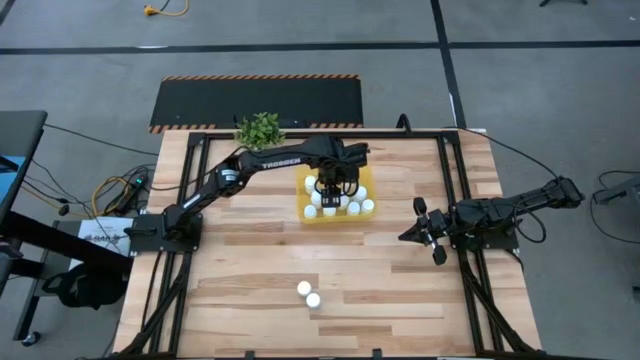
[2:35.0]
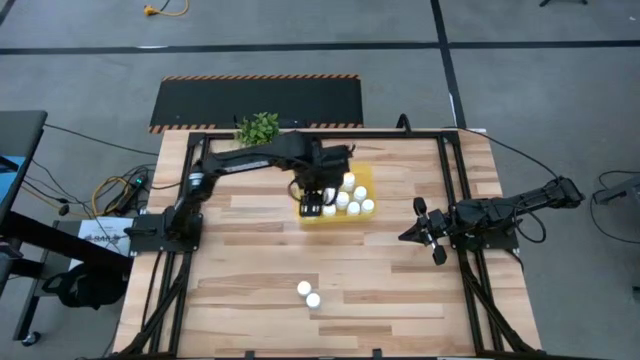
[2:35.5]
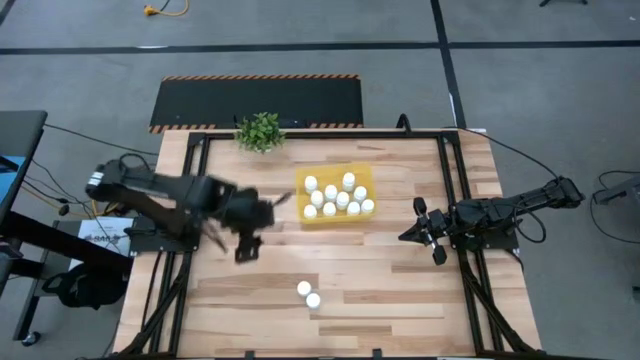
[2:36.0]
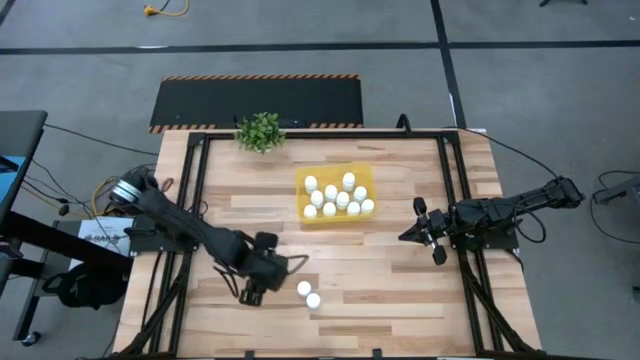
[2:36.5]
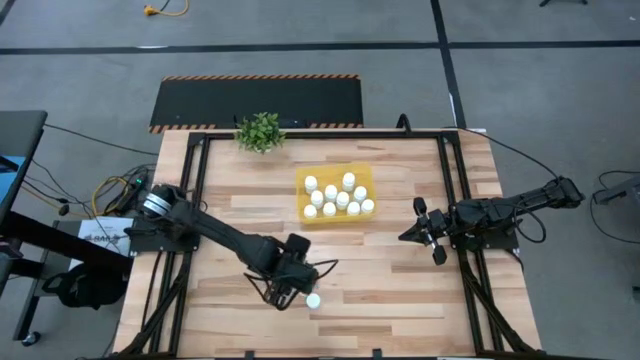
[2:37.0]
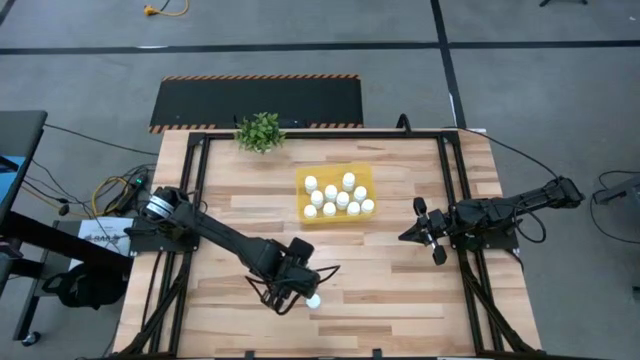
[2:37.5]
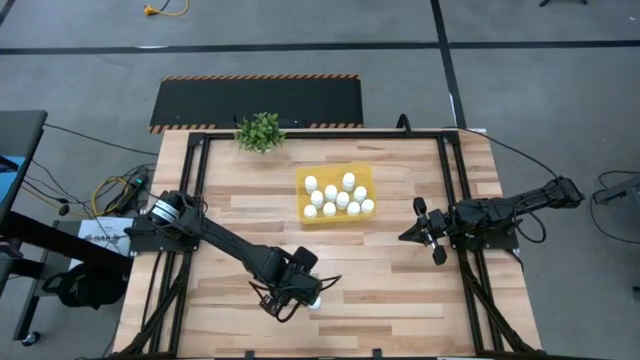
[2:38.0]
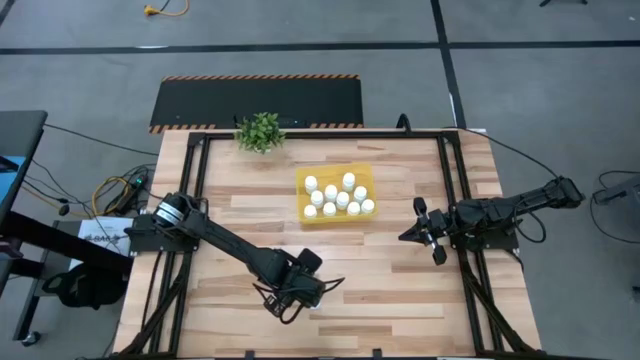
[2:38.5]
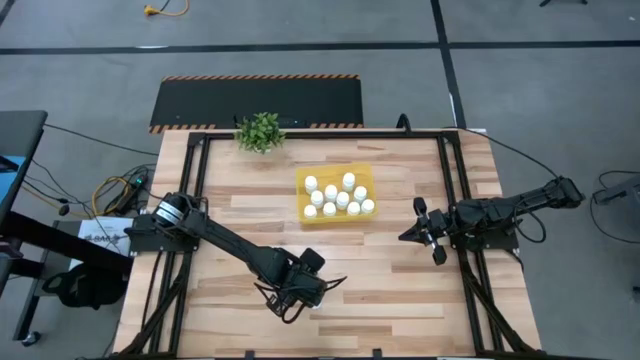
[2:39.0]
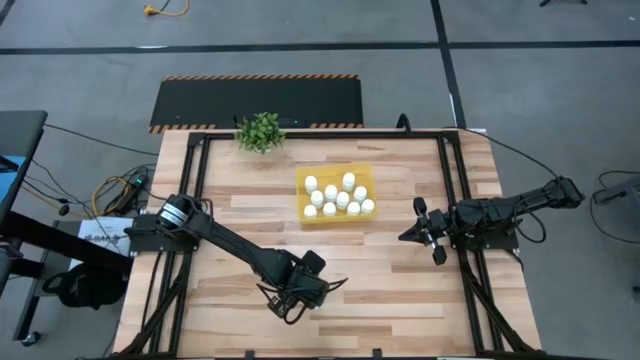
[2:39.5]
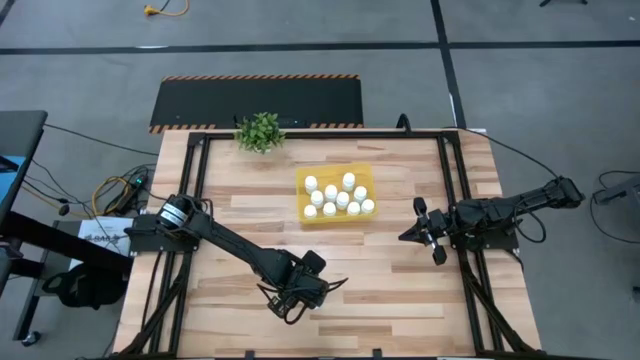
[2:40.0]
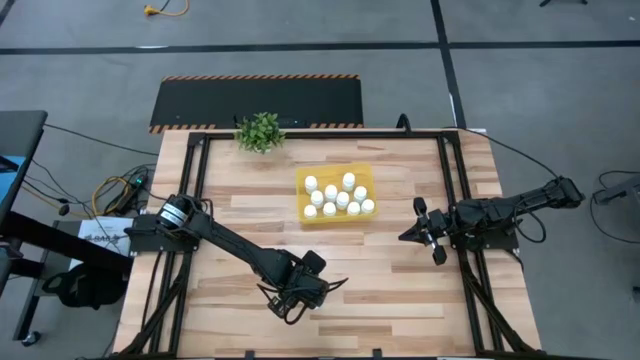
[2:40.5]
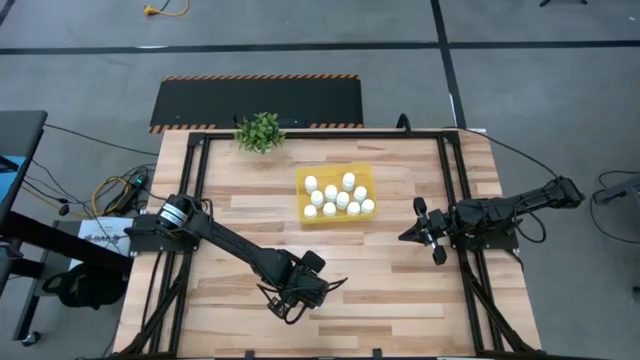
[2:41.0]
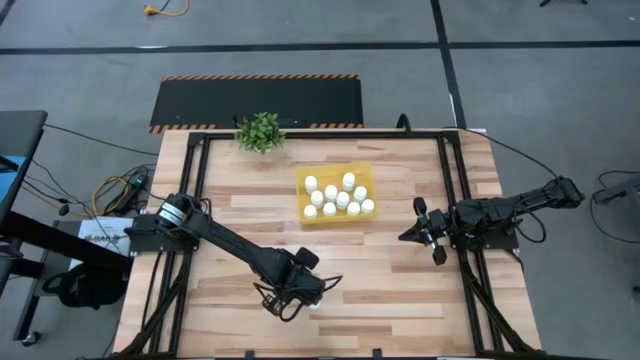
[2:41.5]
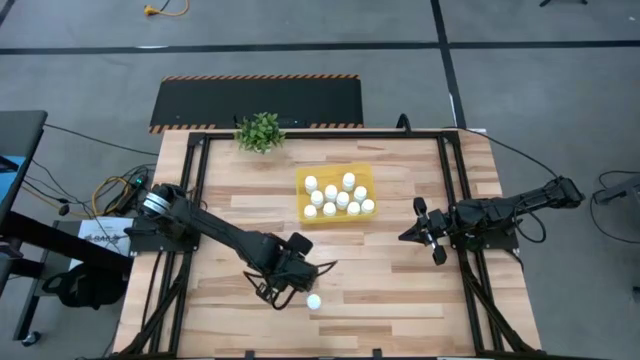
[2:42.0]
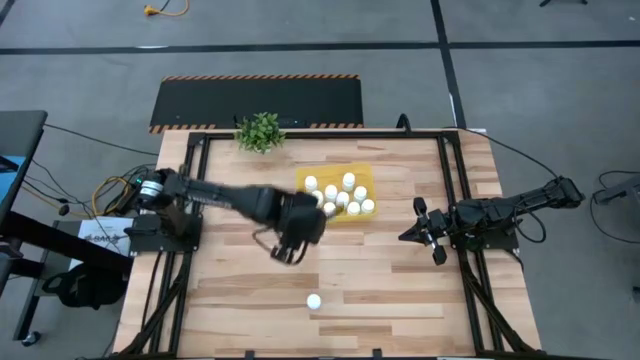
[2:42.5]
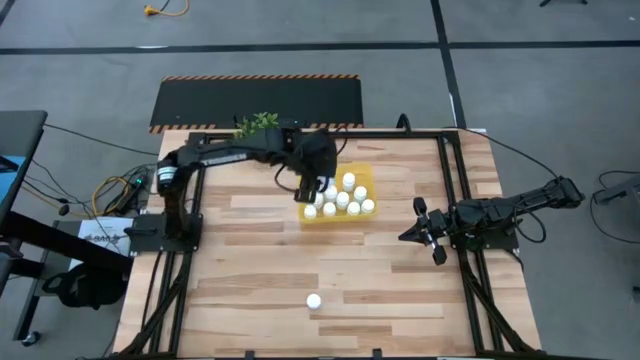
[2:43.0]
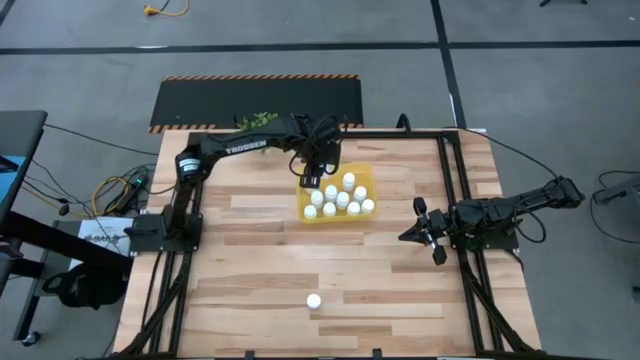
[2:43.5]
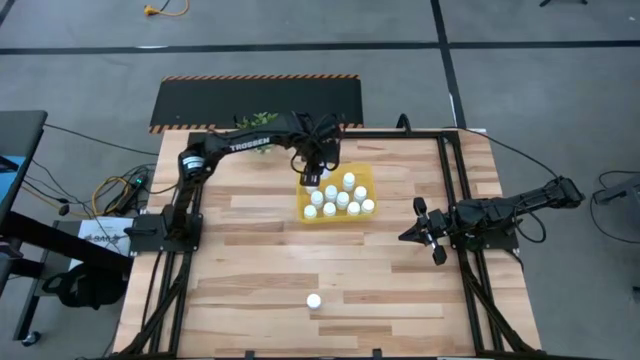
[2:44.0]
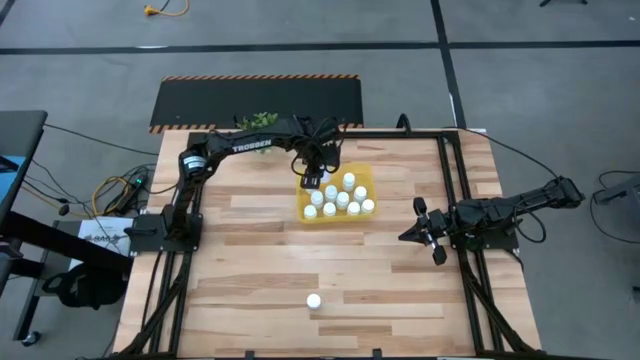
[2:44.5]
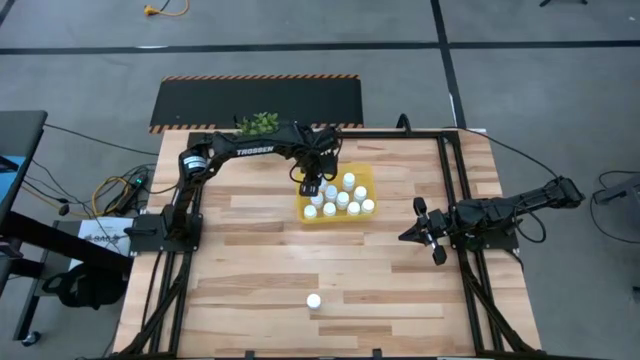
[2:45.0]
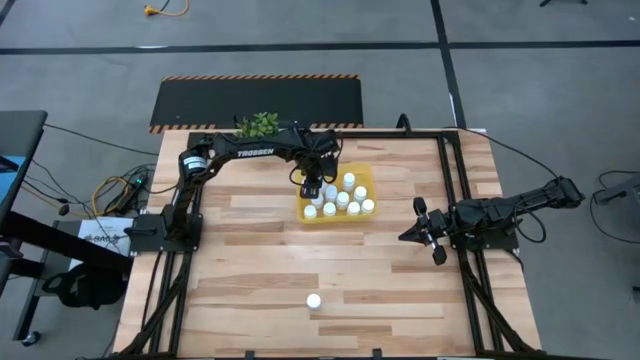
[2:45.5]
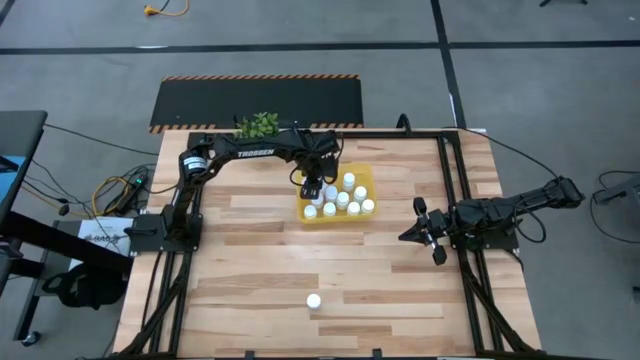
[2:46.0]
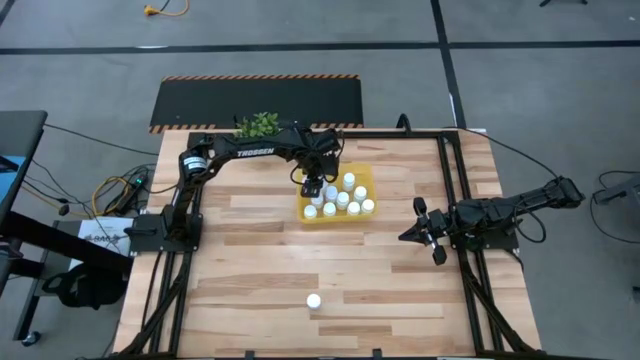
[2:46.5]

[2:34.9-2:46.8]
Task: Pick and place pill bottles into a basket
Put the white medicine bottle into the yellow bin

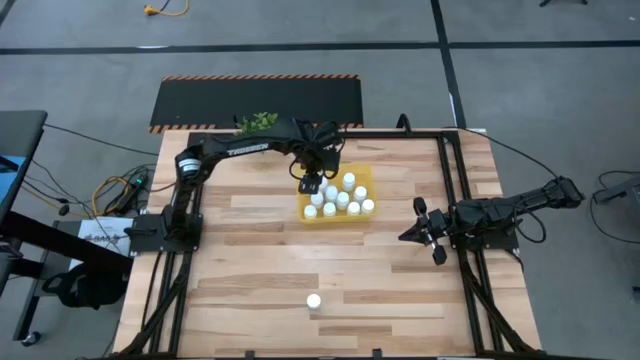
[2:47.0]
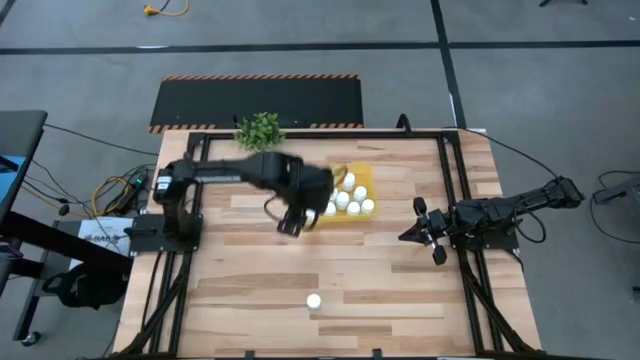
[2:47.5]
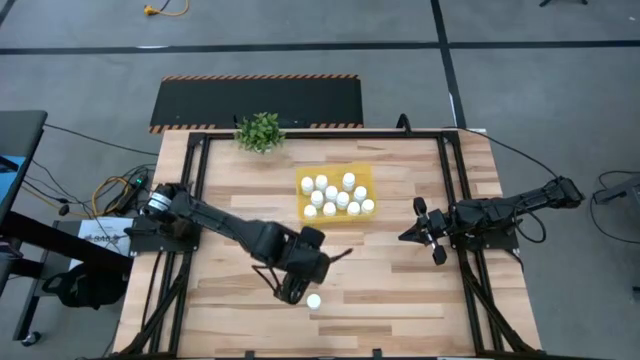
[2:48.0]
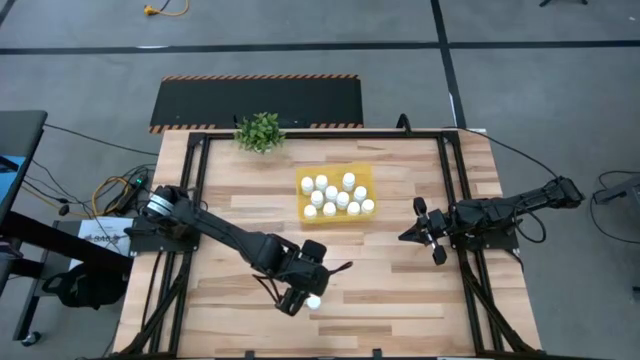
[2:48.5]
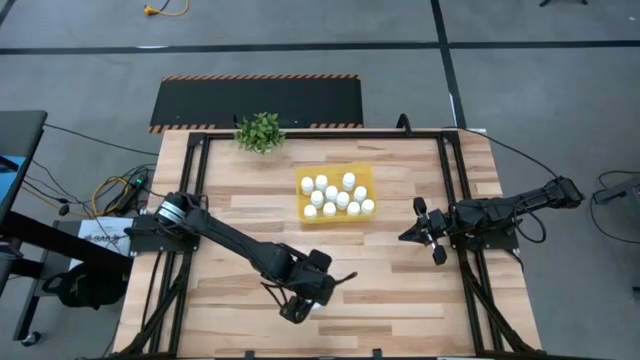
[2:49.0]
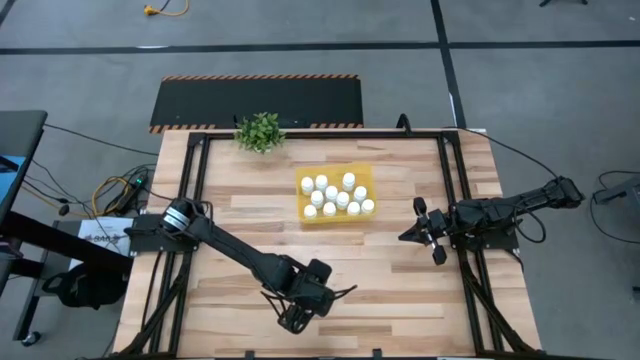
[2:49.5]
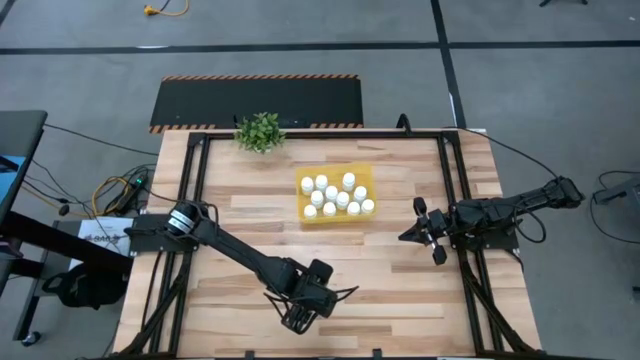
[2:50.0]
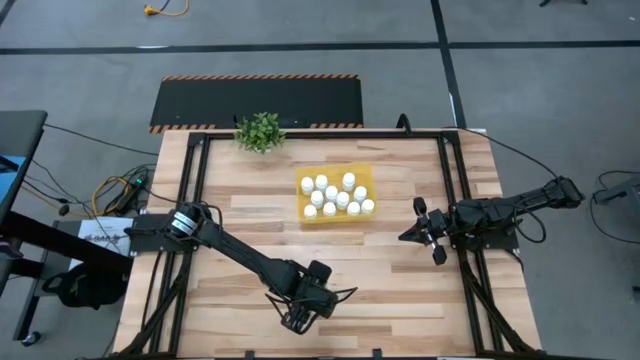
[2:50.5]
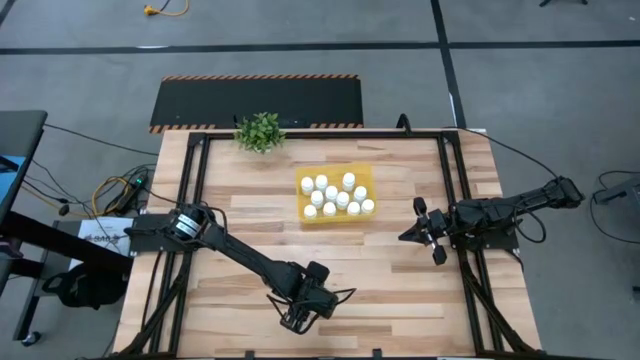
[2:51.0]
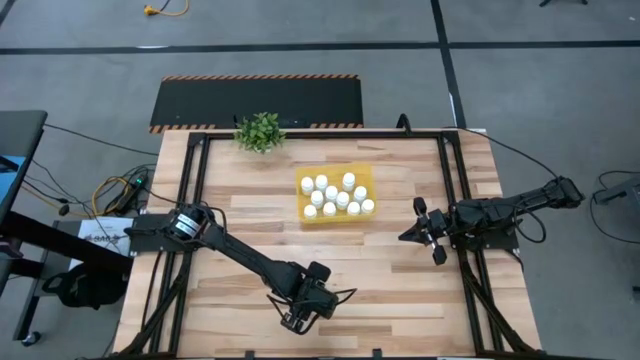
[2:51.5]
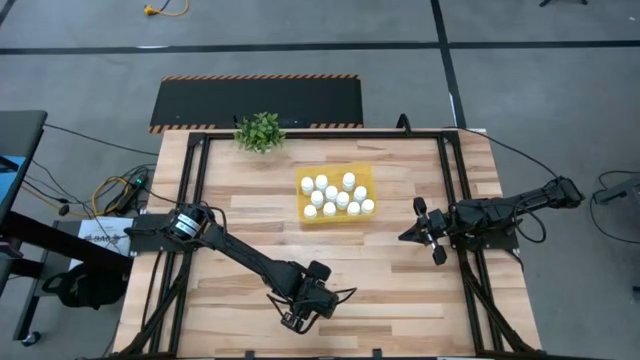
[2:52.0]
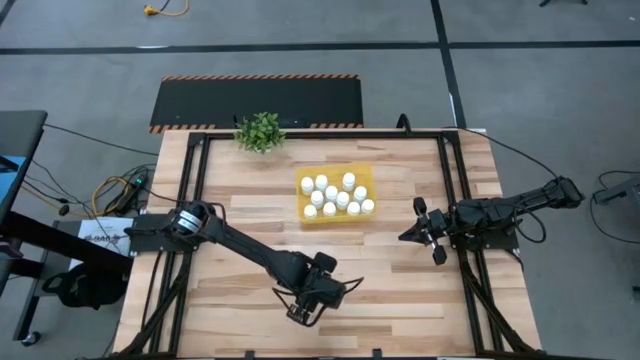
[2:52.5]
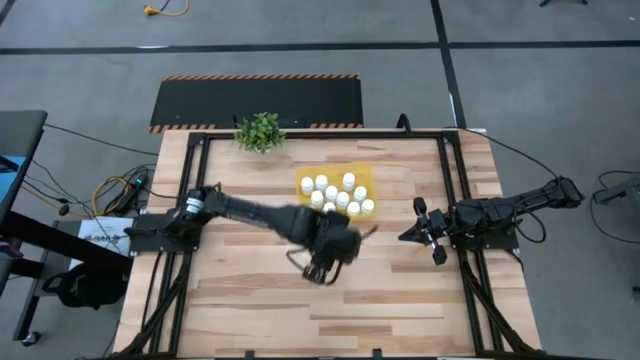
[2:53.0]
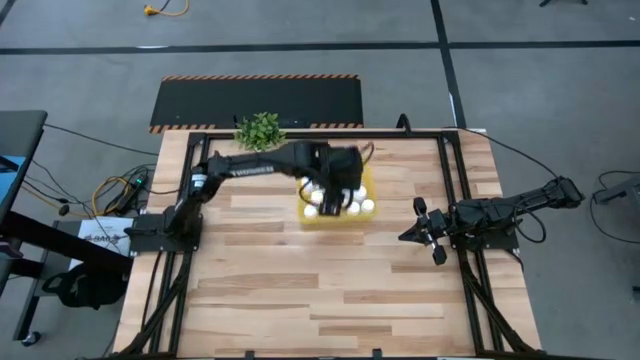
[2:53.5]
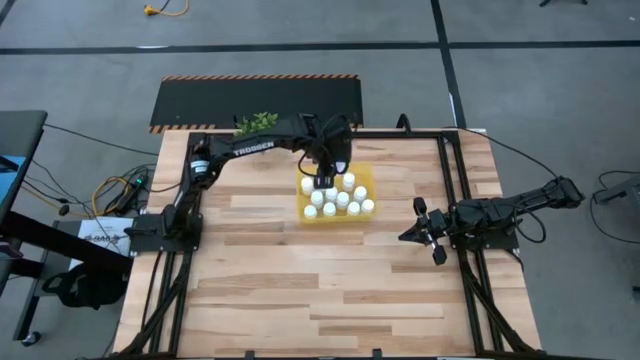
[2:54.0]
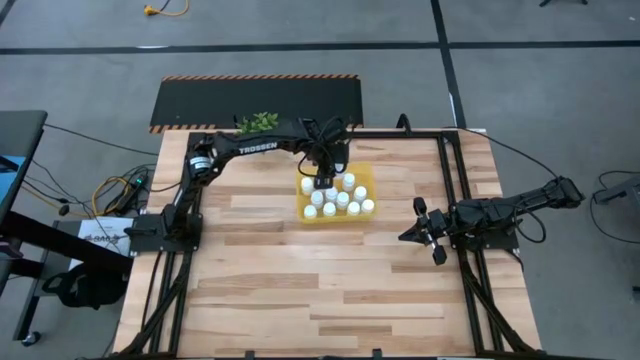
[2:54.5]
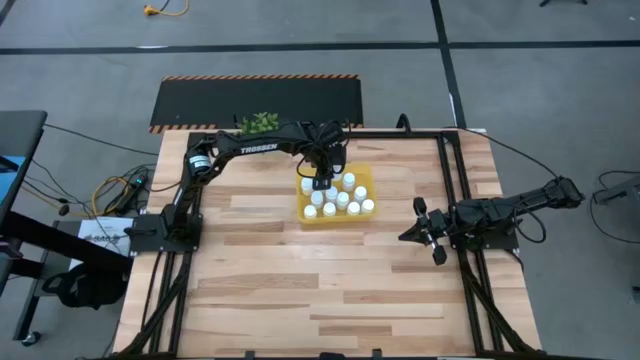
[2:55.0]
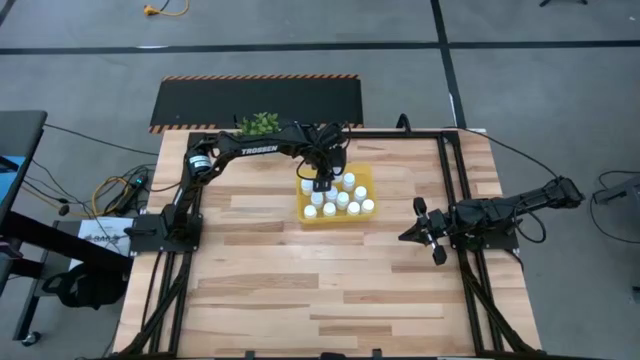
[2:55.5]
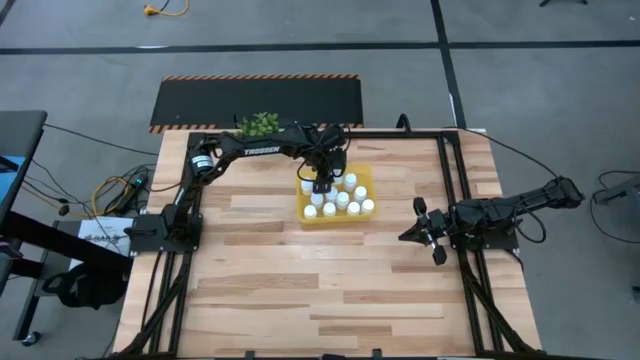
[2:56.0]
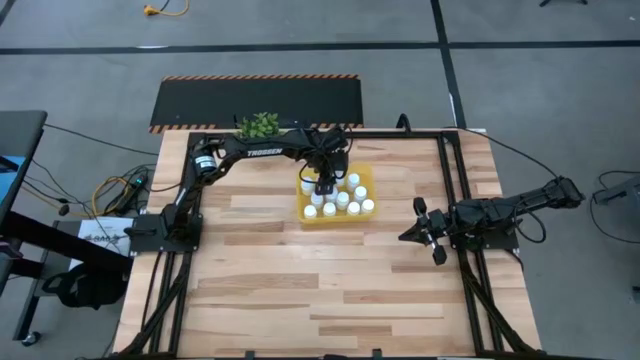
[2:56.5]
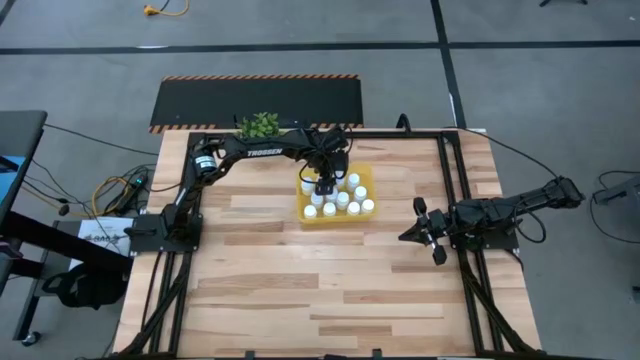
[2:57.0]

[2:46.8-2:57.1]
Put the white medicine bottle into the yellow bin
